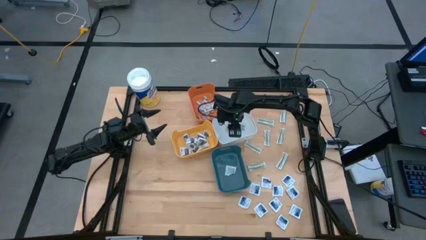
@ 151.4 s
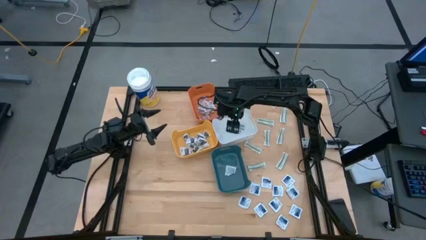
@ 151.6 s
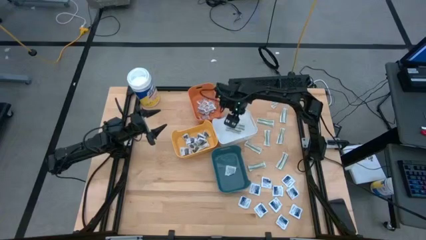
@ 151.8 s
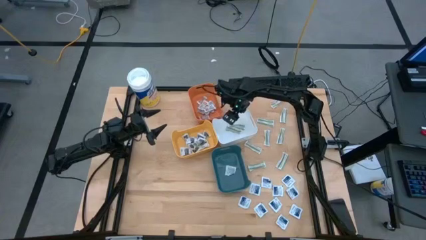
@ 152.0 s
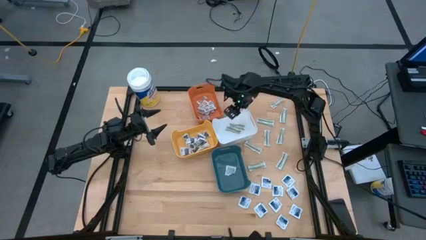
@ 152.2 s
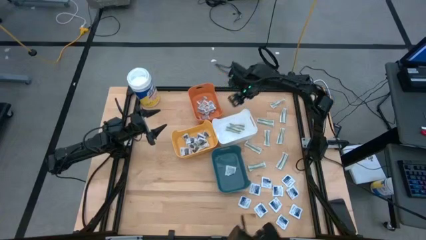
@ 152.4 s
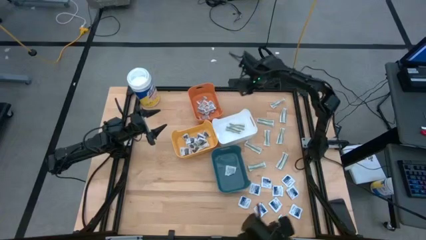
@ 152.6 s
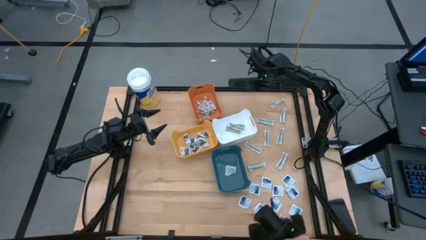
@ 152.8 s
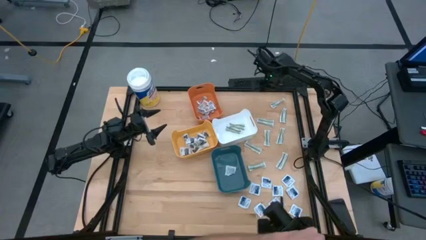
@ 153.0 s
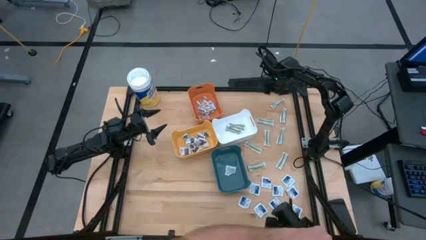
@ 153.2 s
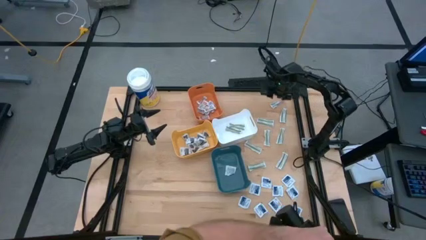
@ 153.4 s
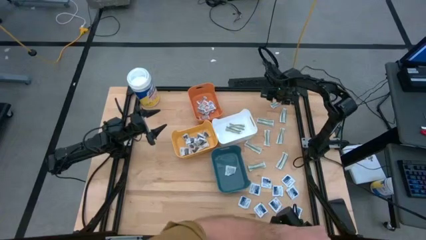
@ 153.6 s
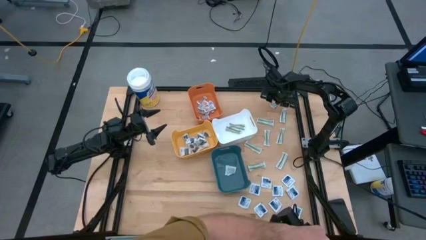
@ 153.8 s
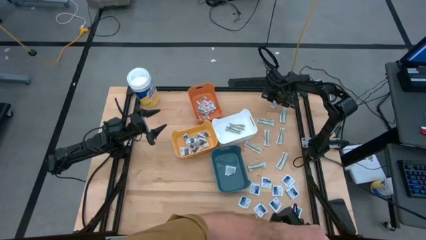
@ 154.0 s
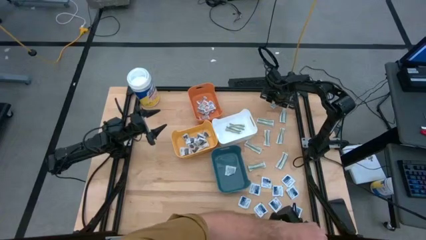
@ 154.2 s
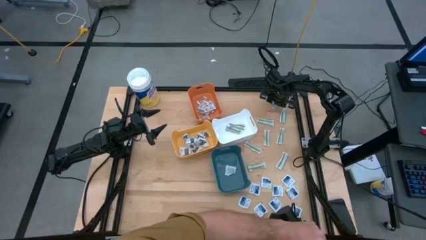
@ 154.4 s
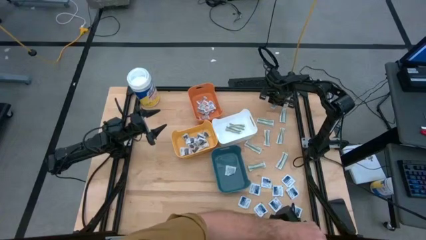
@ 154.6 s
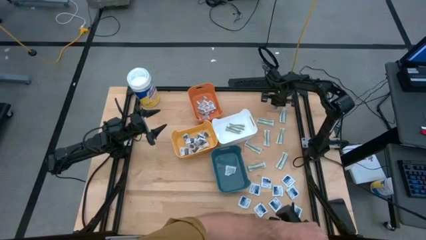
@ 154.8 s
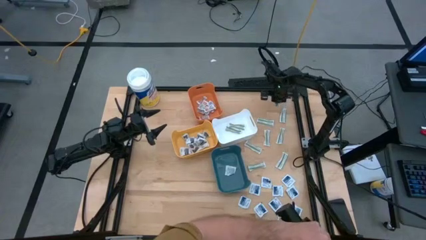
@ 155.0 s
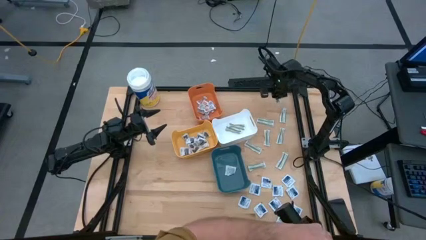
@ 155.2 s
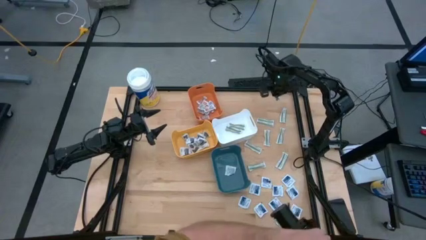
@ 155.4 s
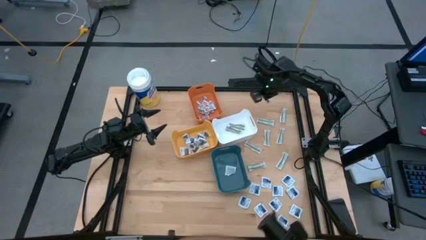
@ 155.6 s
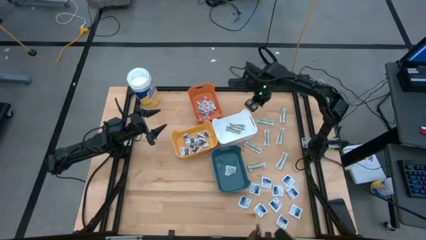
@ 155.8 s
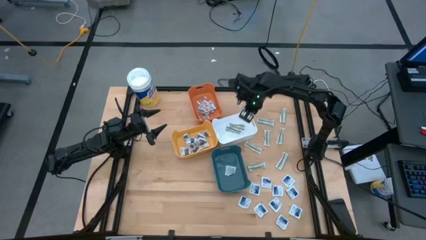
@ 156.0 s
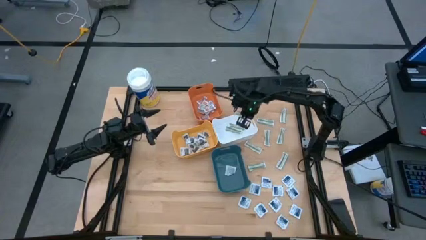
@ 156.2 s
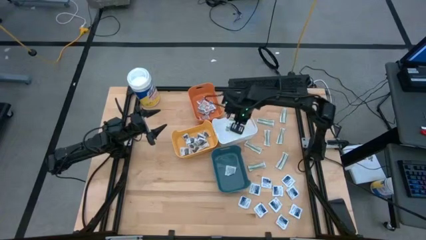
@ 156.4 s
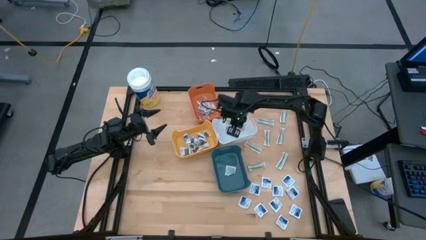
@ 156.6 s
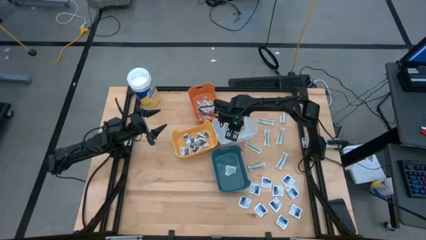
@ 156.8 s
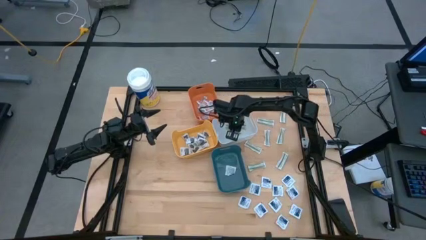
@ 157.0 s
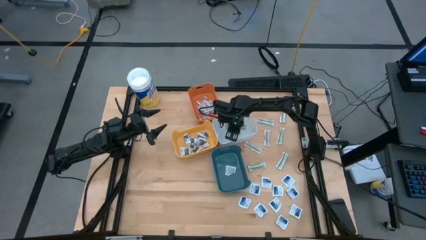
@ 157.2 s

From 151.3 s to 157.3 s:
Task: Pick & Place First Aid Supplies
Put the green bandage into the white bin

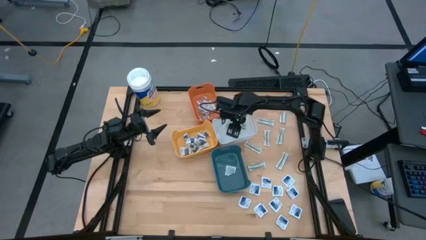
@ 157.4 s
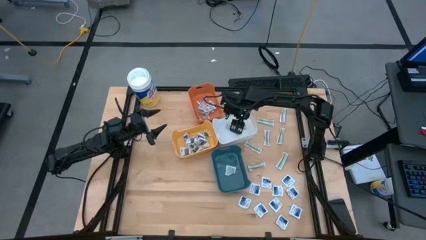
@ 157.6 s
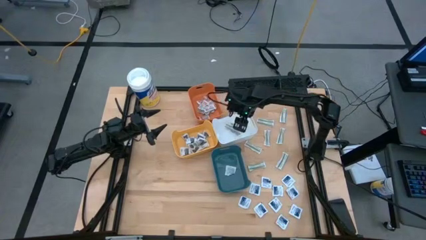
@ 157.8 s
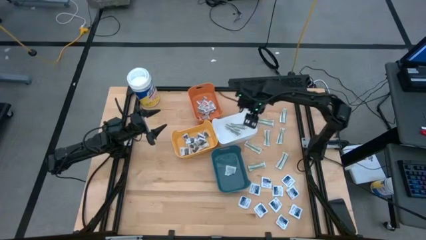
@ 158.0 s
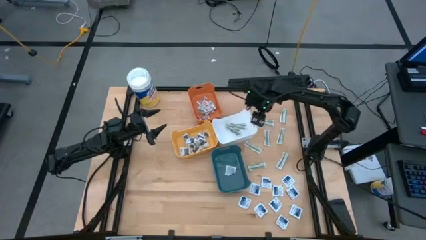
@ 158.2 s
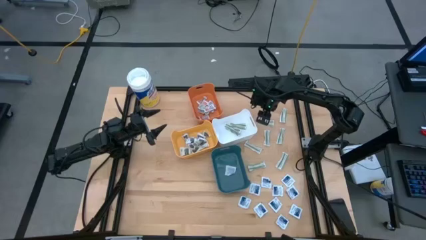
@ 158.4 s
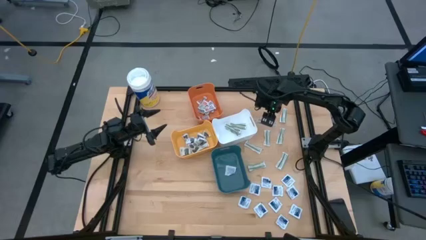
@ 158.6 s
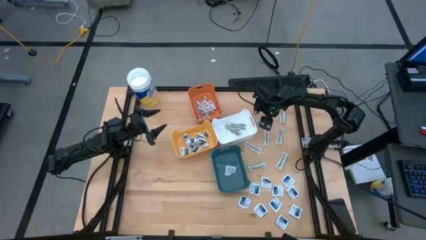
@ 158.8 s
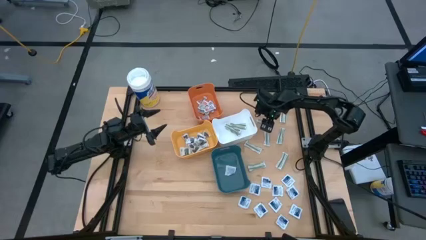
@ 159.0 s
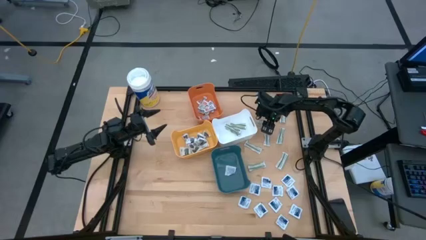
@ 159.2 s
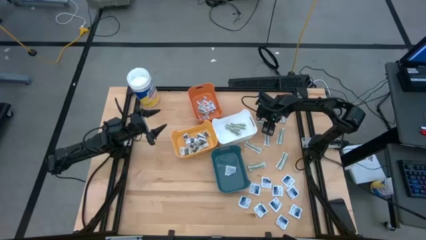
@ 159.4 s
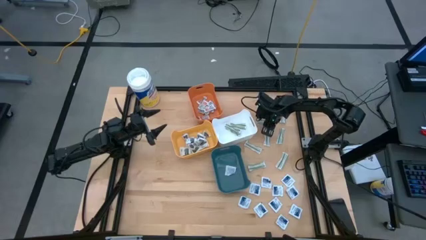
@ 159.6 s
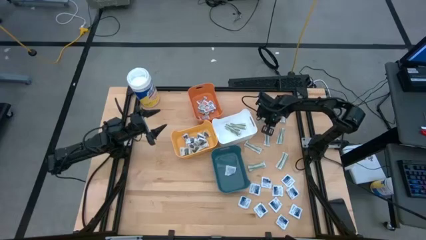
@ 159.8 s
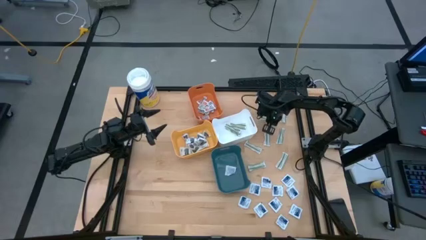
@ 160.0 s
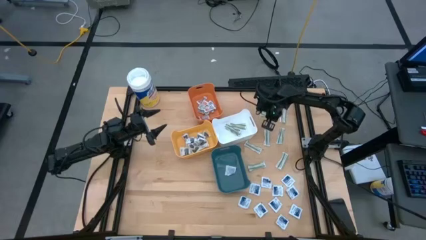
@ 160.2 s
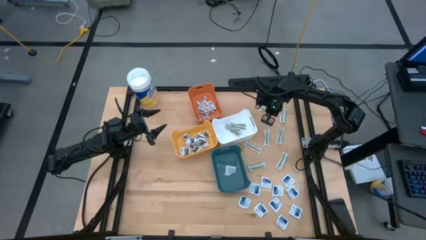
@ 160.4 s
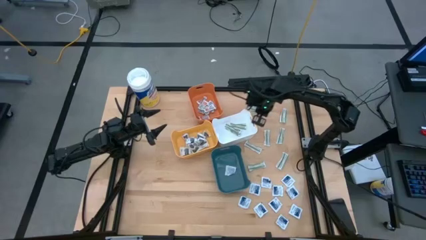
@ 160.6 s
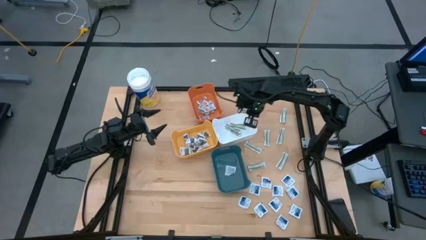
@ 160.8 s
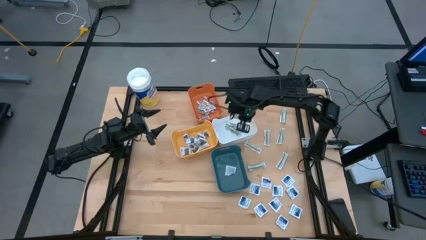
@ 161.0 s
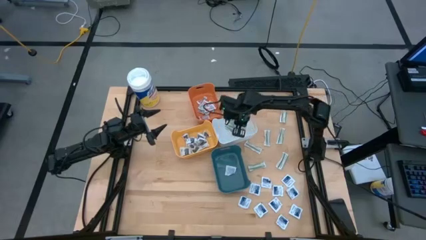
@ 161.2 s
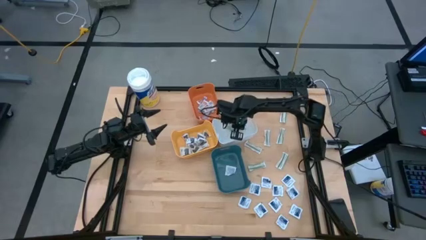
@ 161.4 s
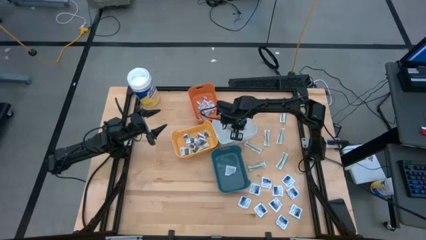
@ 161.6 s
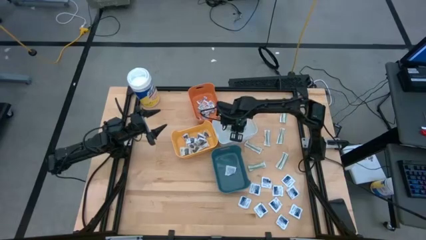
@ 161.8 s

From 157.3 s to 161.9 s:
Put the green bandage into the white bin

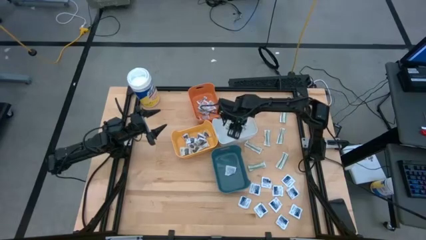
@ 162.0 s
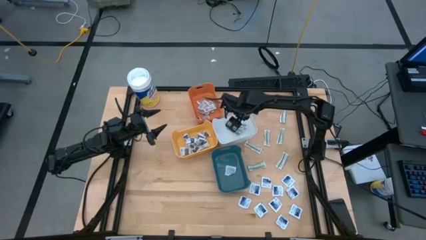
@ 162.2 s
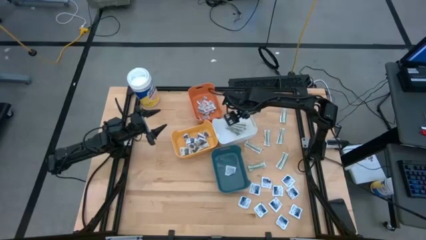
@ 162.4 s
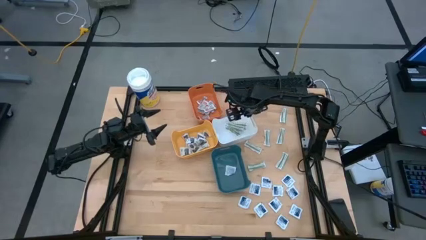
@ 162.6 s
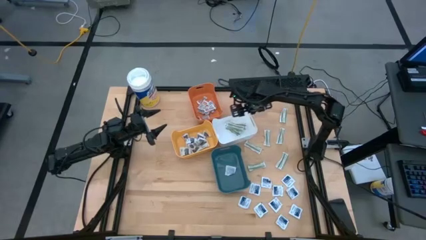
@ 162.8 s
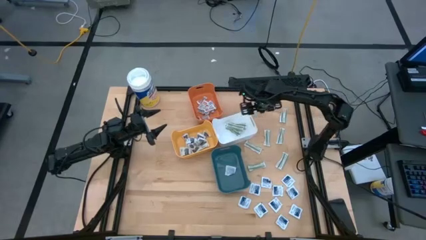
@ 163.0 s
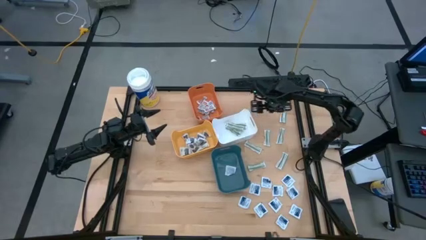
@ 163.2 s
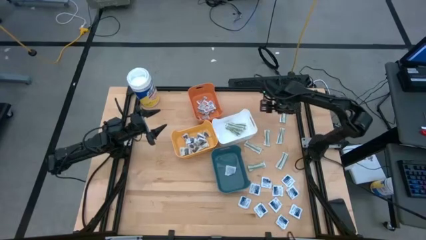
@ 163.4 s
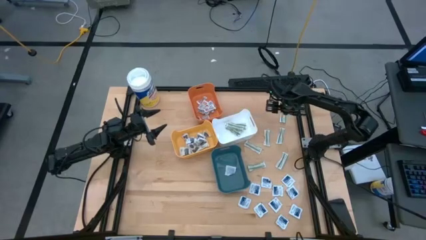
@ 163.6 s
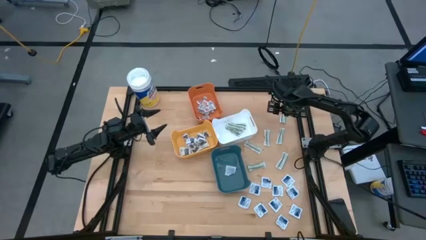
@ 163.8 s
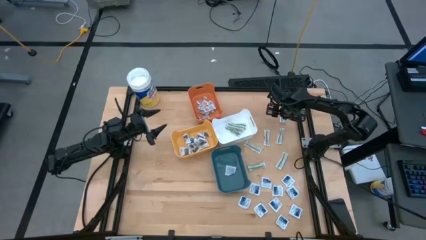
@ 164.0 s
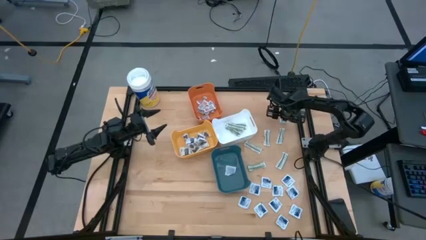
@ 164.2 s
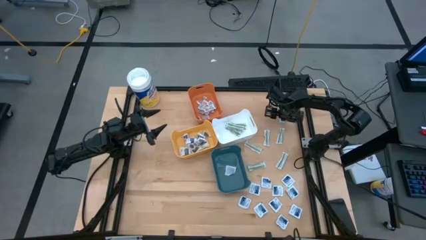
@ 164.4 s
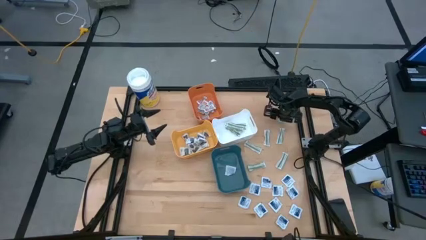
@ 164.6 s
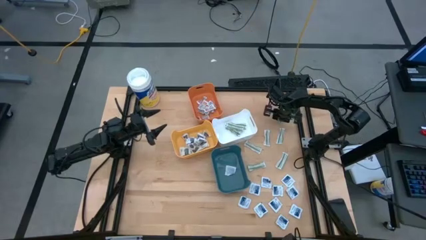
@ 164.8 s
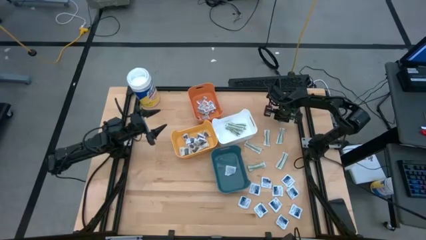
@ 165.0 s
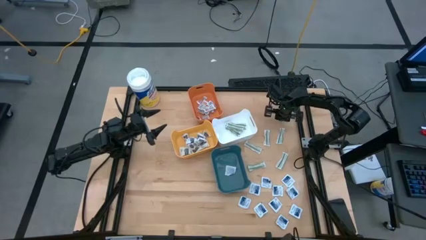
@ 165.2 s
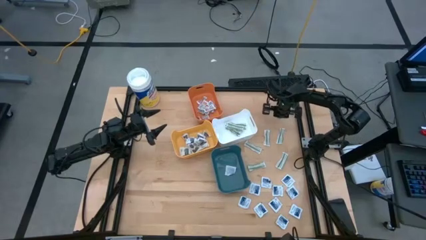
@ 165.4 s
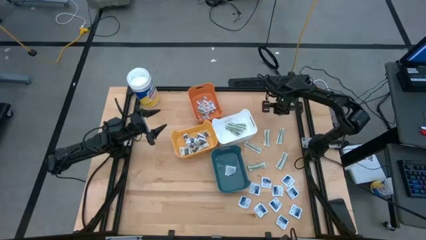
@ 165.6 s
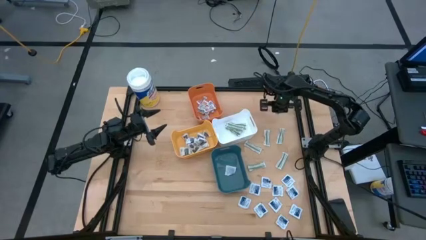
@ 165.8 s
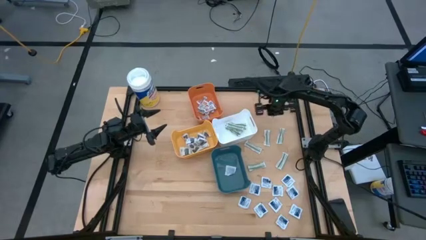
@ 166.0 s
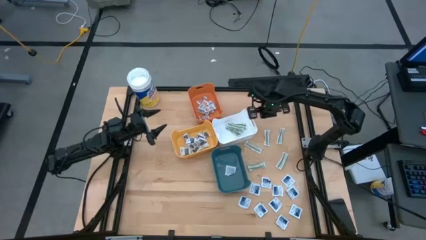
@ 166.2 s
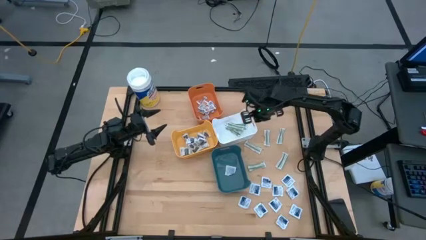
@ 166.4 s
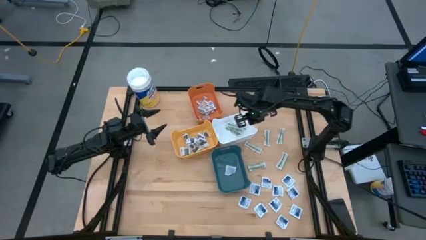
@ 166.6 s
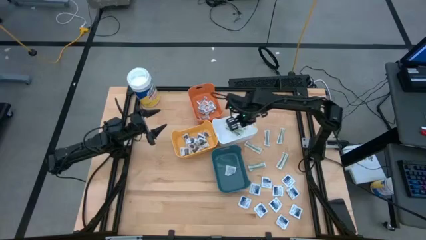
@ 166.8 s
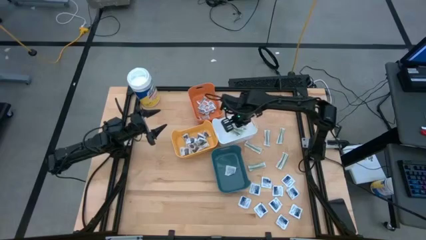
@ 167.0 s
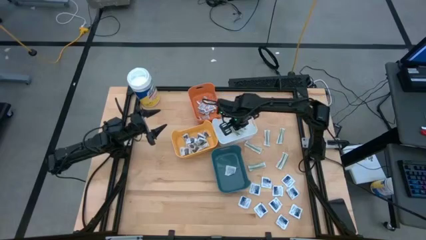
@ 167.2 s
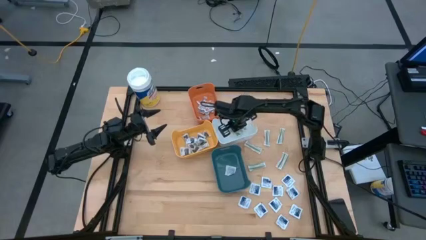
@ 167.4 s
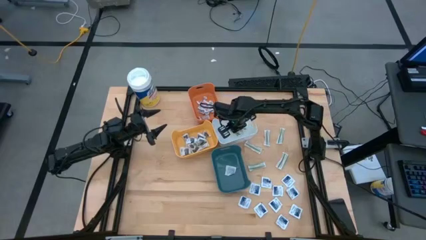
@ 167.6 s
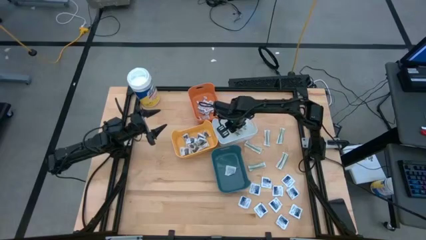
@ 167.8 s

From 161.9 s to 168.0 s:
Put the green bandage into the white bin
